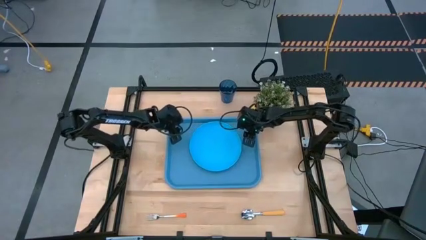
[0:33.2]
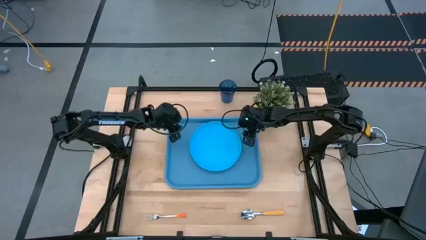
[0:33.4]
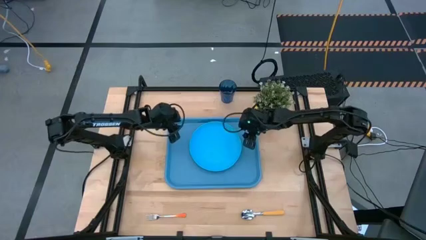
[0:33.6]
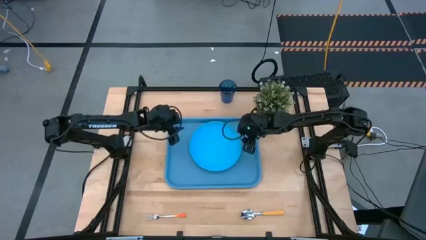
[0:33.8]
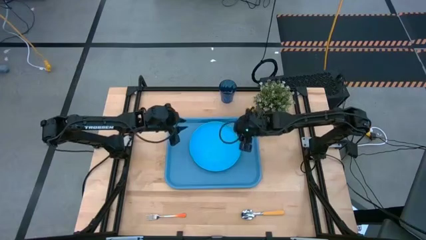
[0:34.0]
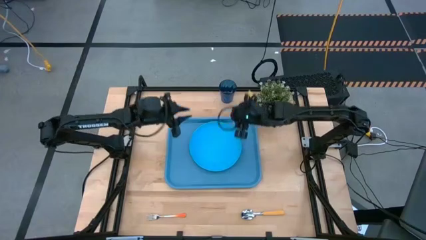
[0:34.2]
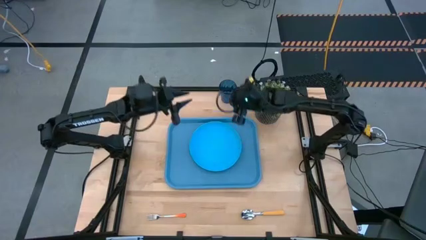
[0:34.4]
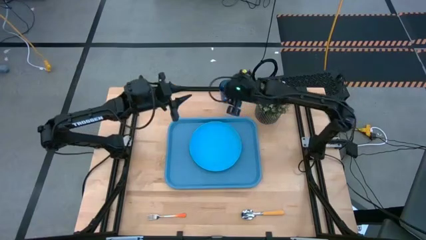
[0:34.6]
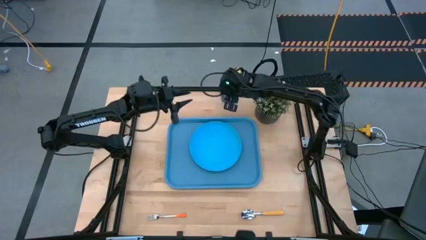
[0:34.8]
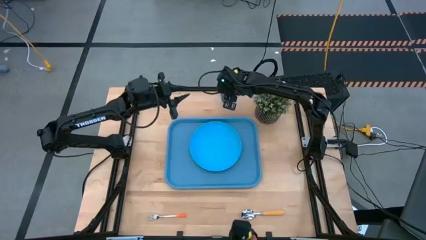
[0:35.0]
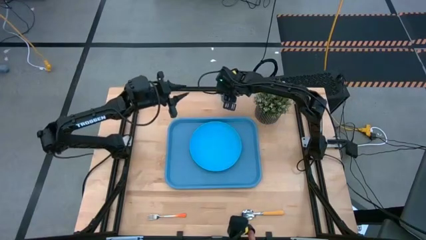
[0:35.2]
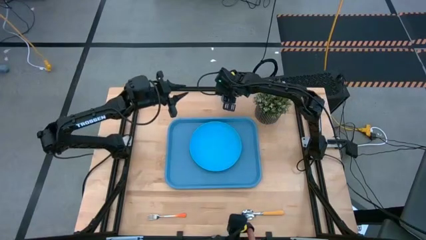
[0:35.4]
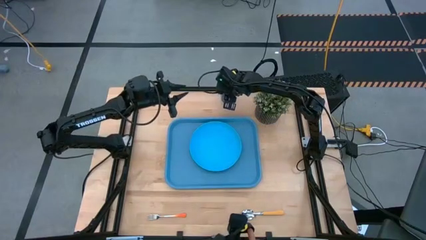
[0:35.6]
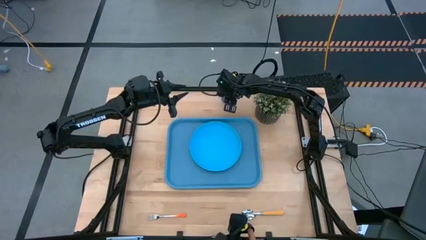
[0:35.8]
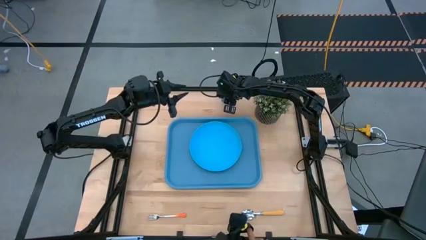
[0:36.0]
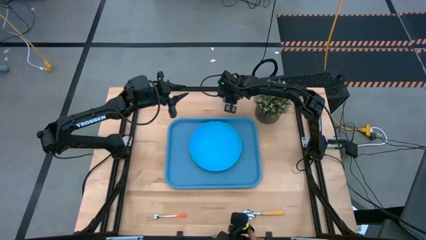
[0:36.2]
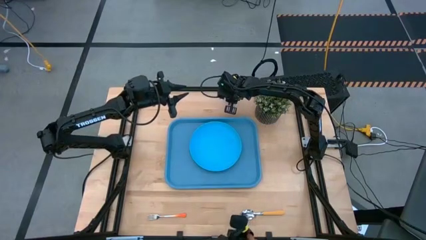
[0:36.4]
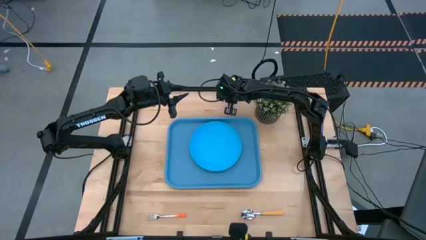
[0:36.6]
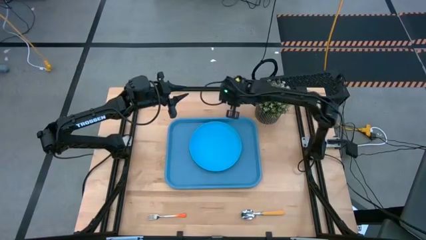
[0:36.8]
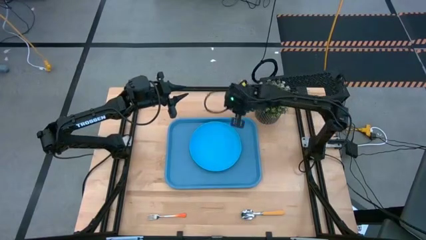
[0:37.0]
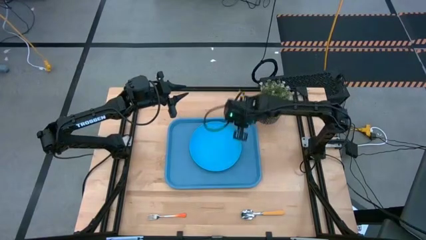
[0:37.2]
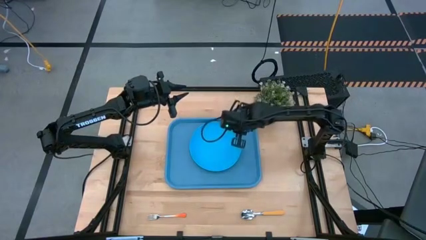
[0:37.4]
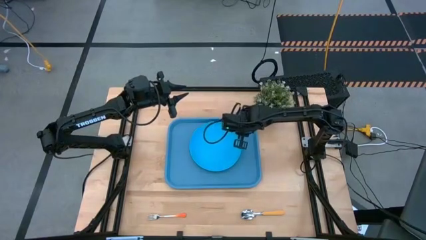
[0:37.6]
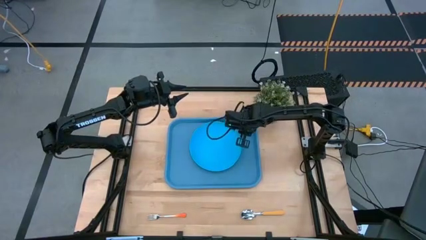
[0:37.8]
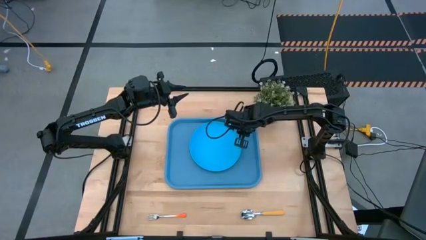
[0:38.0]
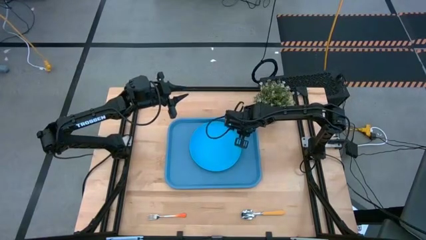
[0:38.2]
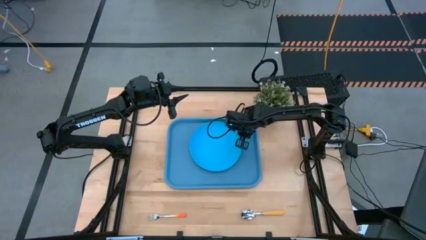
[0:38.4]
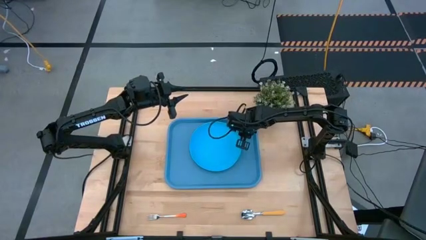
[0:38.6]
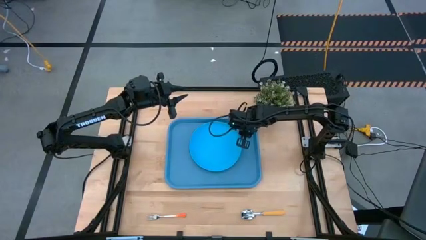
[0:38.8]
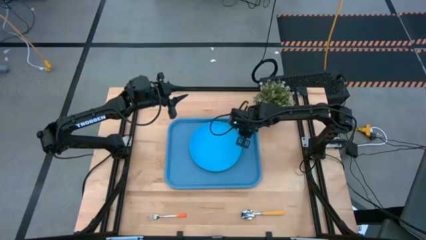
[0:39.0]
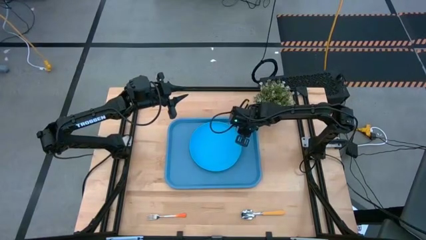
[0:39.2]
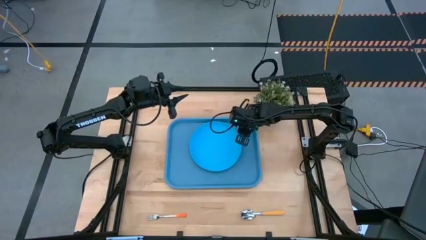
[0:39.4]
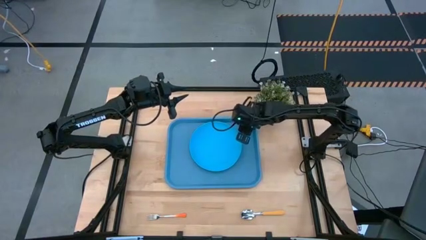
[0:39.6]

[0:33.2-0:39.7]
Task: Pick and place plate/cup/fork/spoon on tray
Put the blue cup on the blue tray to the top right of the blue tray

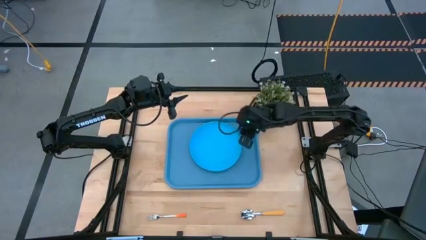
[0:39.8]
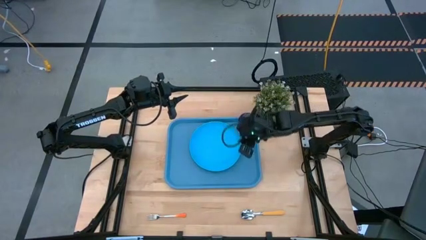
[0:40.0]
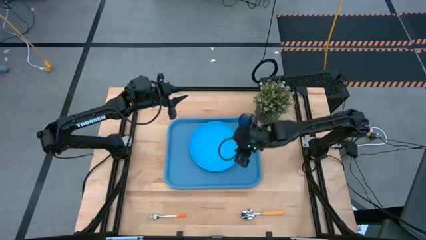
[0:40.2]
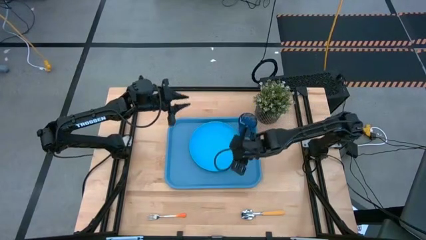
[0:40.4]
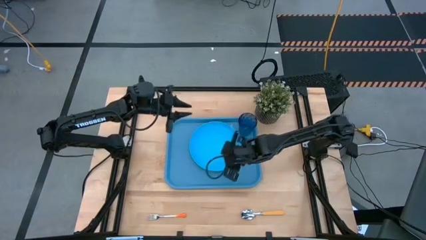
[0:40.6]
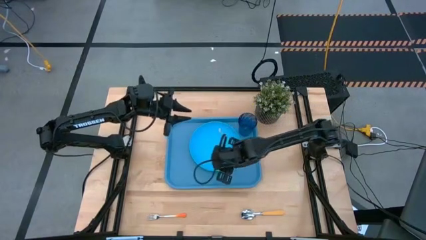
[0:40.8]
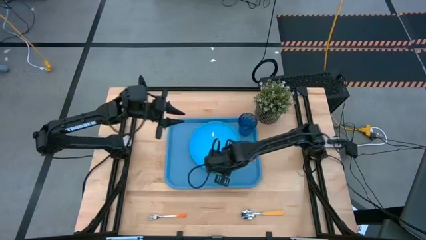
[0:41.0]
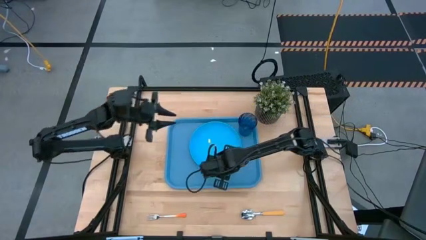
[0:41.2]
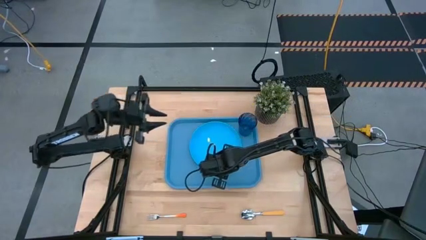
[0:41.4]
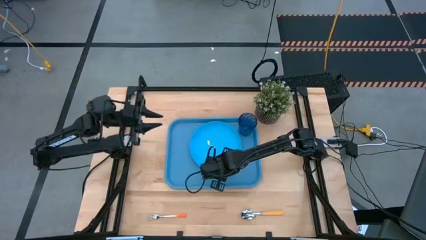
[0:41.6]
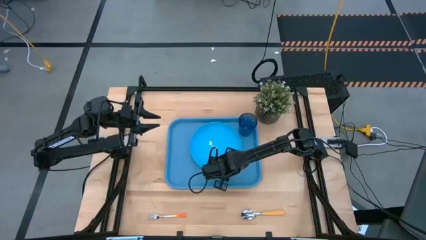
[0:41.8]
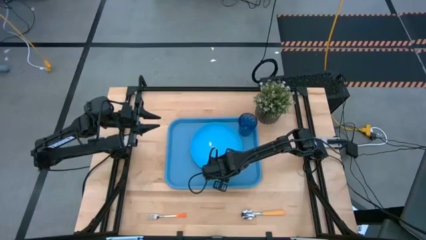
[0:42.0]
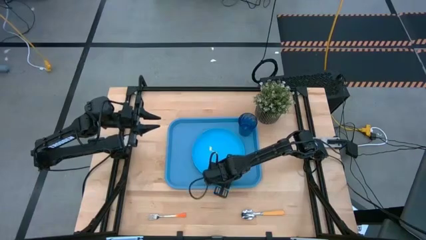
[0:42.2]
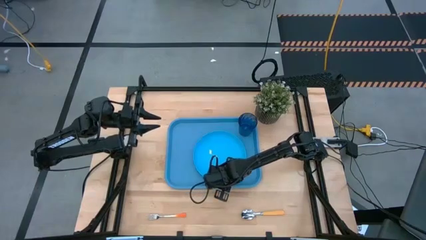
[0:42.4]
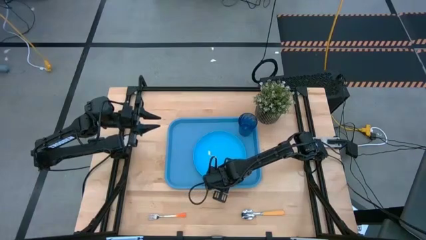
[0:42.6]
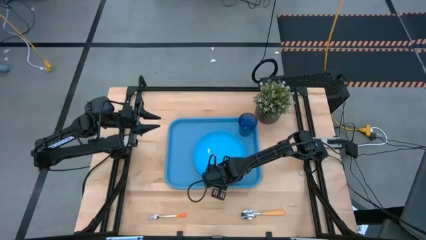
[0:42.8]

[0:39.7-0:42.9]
Adjust the blue plate
